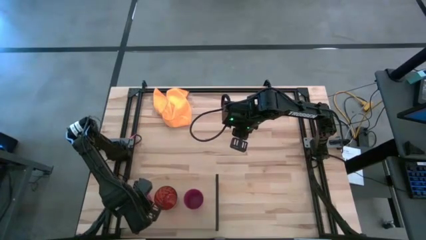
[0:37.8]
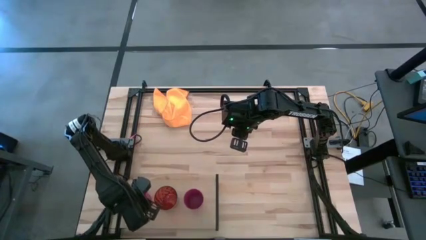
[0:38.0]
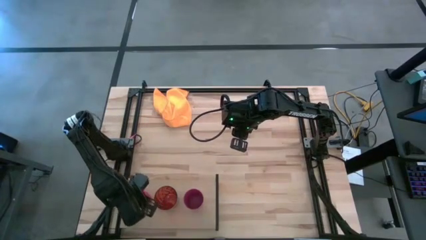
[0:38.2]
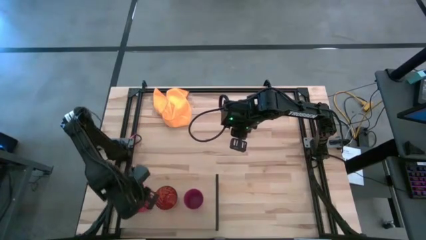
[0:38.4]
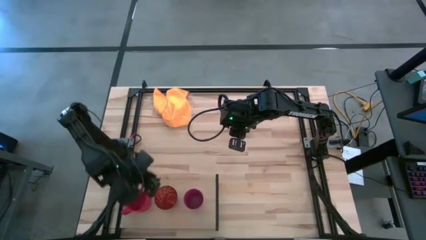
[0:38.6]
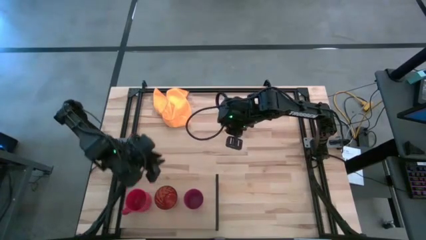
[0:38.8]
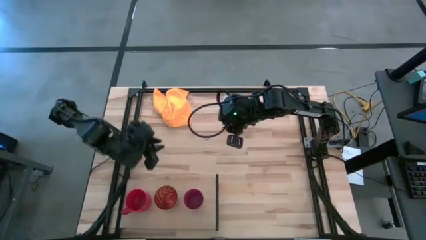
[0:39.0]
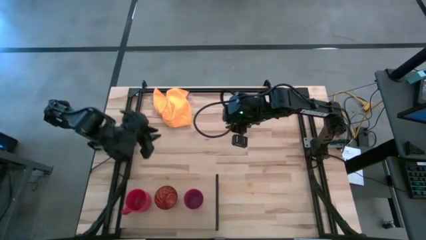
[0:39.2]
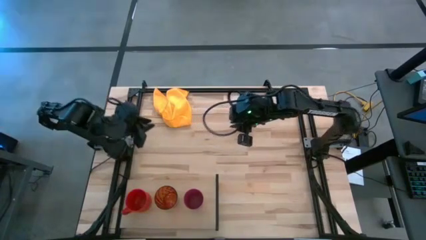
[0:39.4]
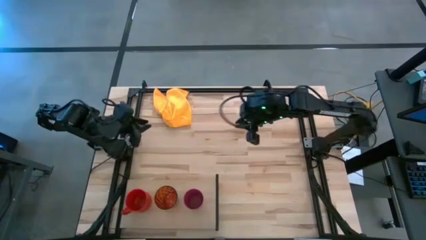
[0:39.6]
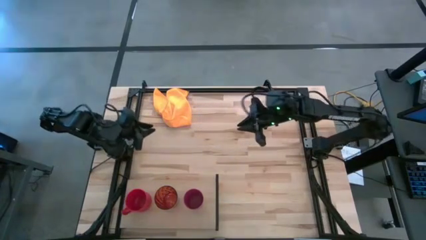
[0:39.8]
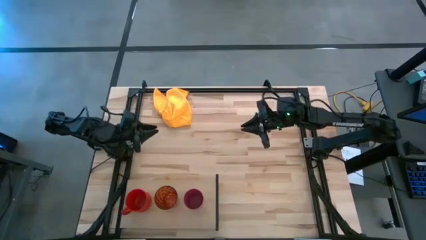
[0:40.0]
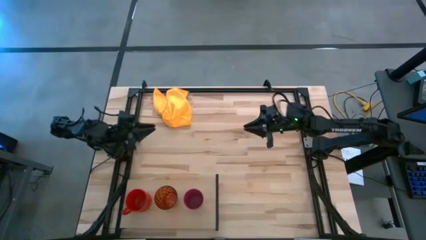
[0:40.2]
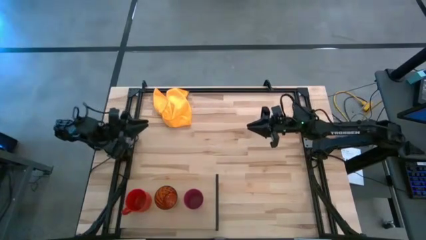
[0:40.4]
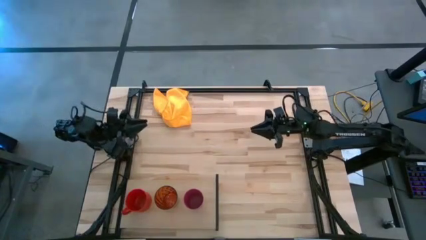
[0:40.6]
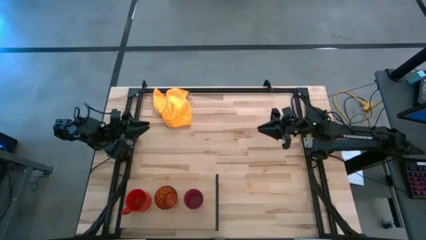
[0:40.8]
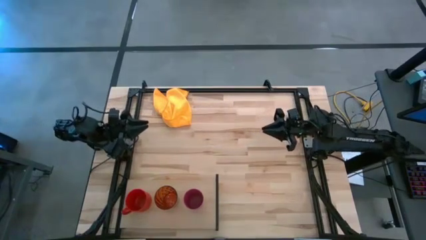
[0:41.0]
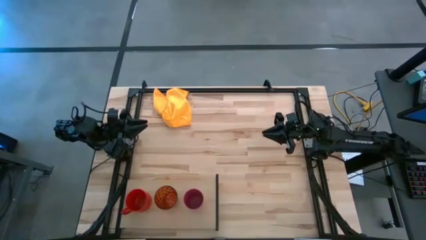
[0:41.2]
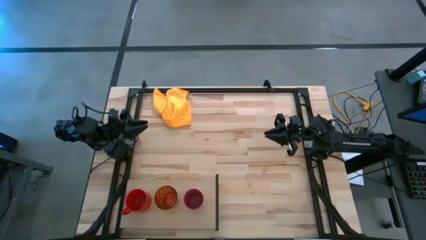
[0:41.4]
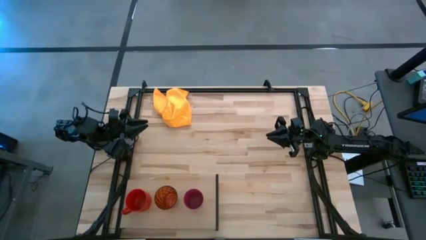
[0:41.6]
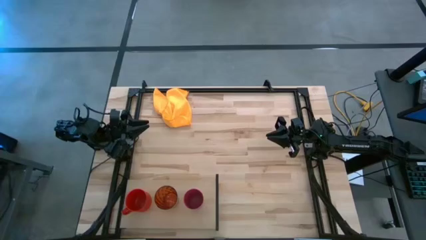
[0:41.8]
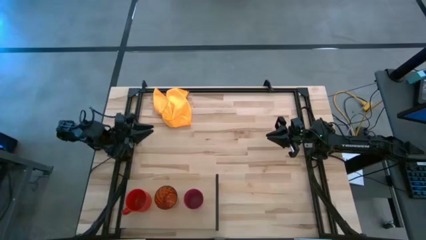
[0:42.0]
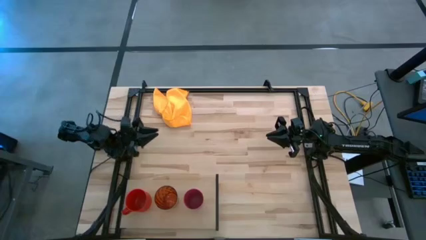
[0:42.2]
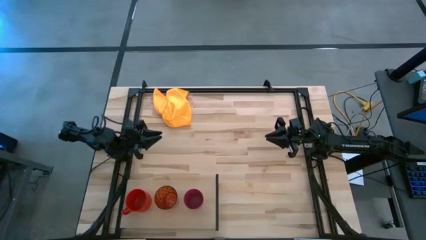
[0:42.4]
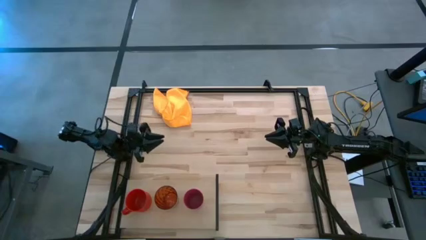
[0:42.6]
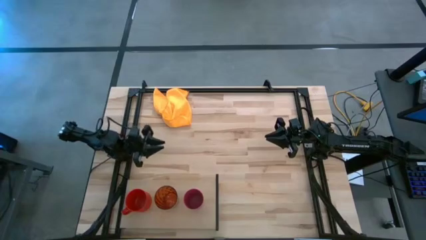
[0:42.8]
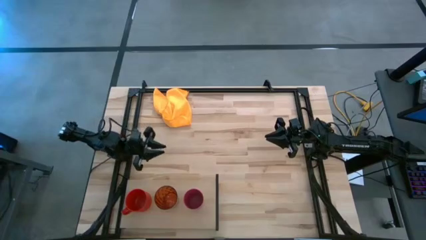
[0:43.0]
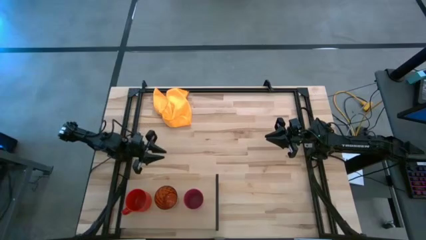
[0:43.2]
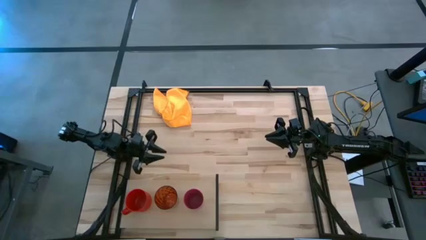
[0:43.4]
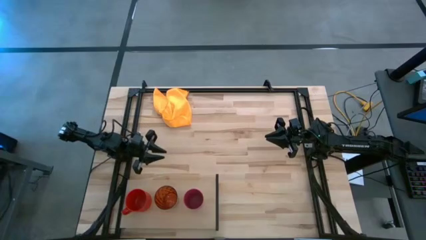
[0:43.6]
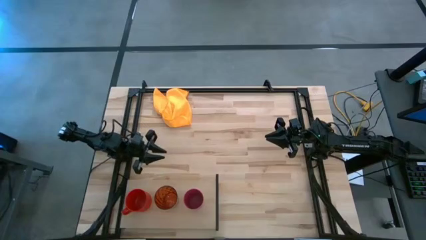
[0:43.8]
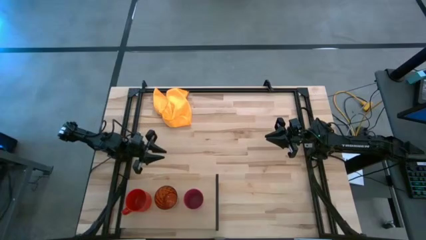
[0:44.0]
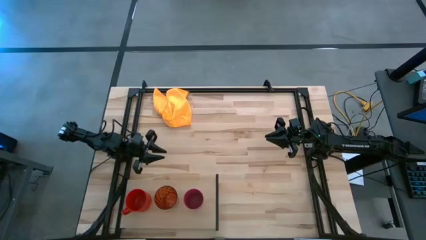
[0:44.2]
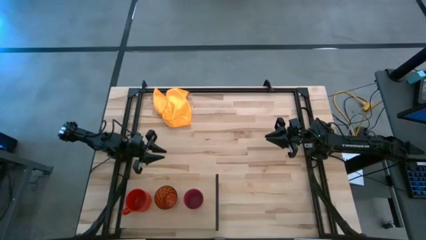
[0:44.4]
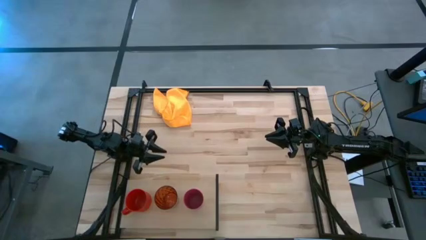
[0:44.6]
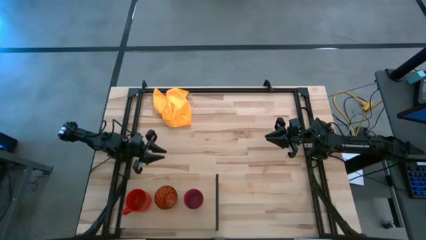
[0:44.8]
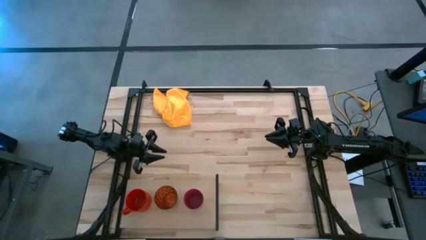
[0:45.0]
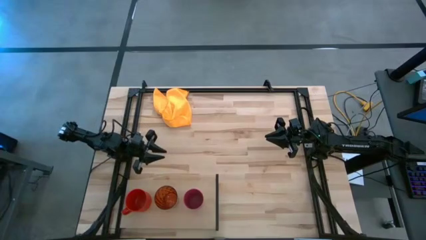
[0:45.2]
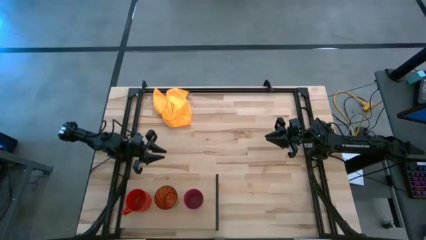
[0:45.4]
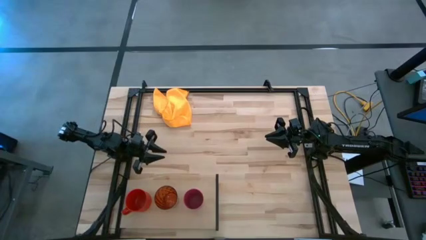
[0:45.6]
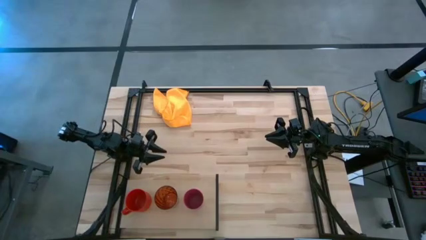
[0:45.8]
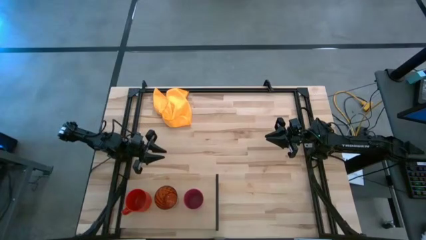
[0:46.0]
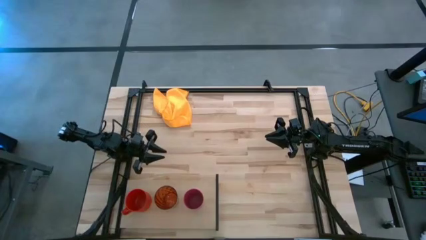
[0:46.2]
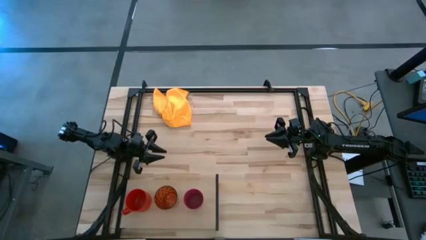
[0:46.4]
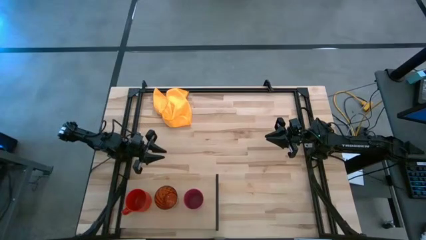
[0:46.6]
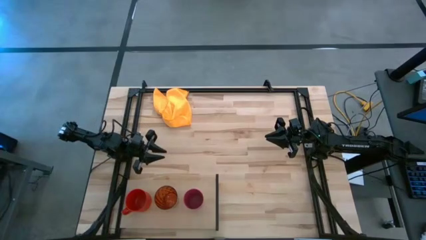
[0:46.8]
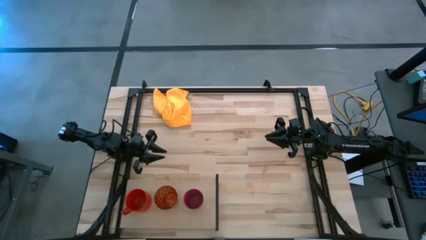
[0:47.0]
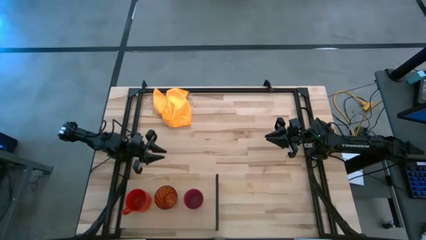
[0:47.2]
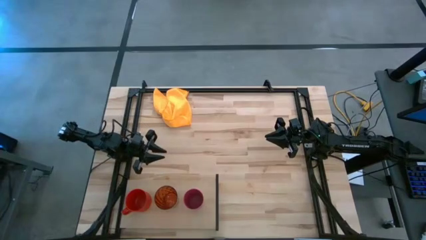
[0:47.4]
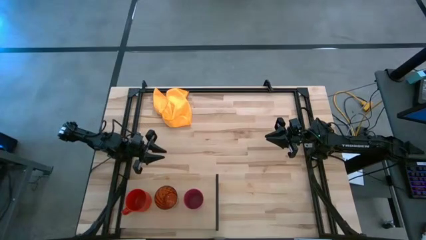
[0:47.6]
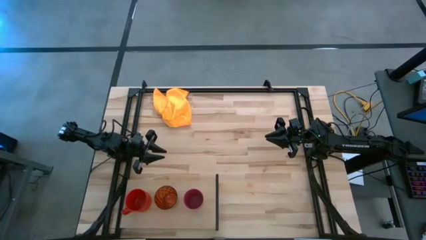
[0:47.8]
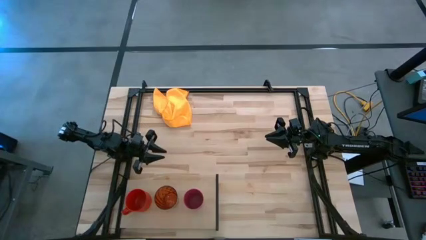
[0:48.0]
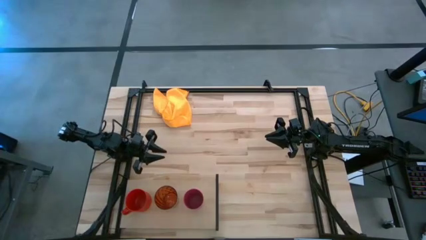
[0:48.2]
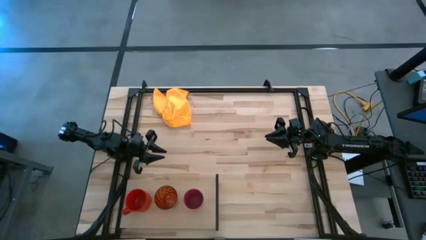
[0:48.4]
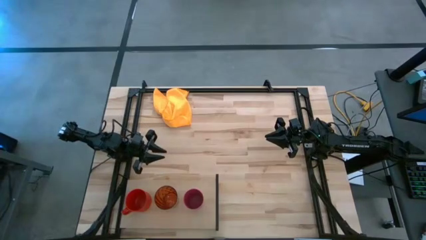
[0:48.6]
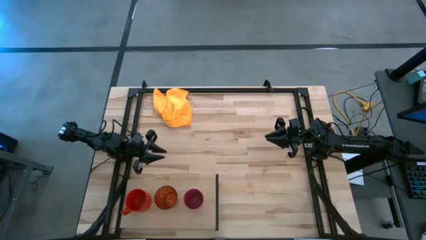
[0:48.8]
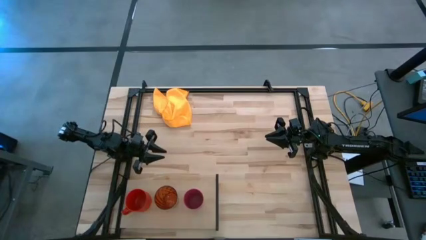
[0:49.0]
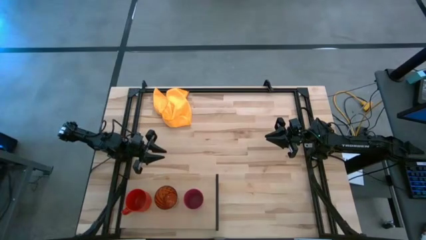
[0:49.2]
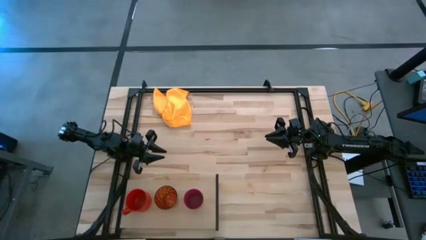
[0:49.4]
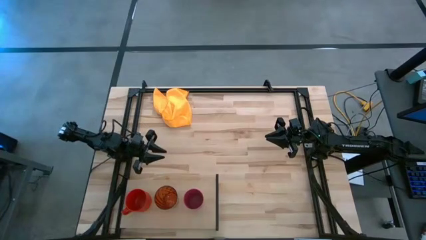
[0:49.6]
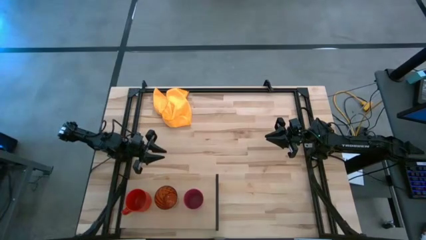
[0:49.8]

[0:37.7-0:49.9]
Task: Stack small to large cups/mugs on shelf
Return to Home Position
